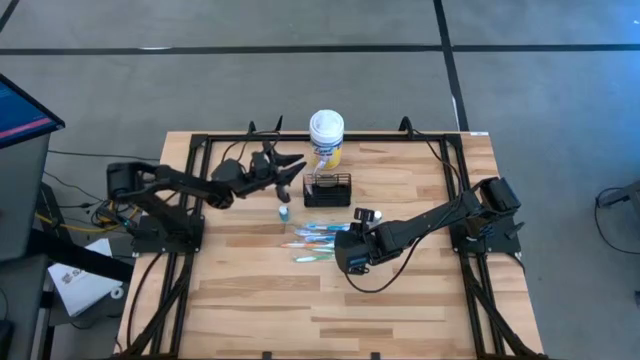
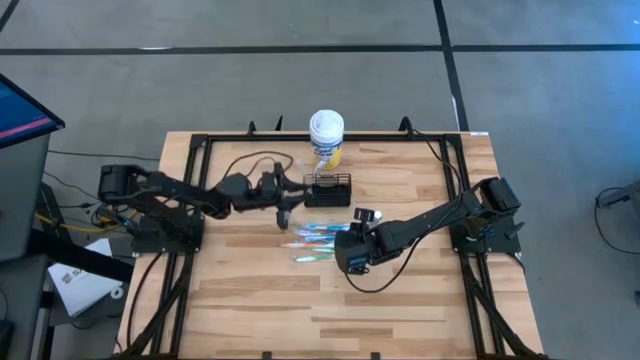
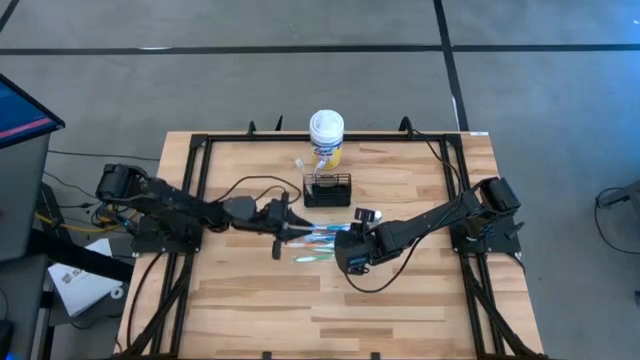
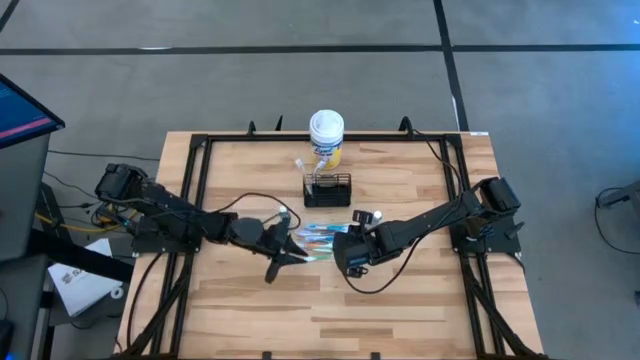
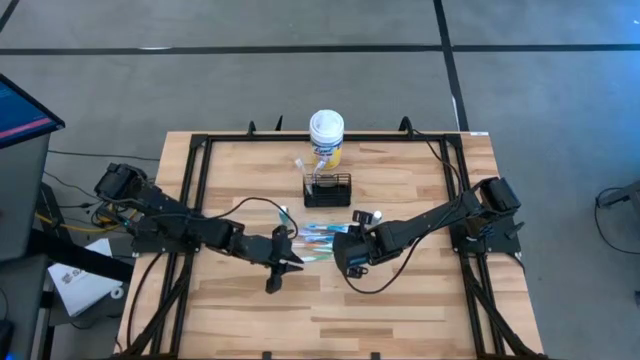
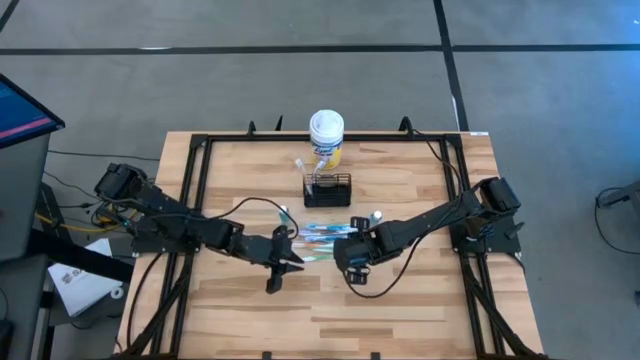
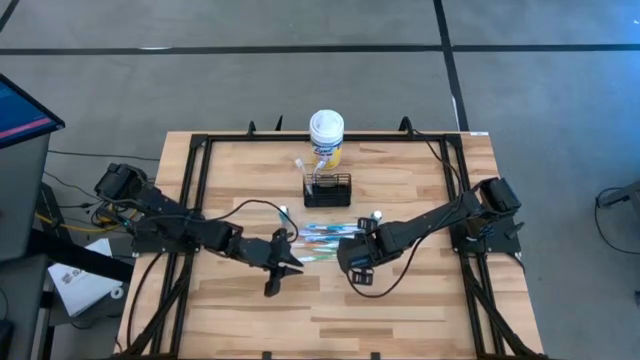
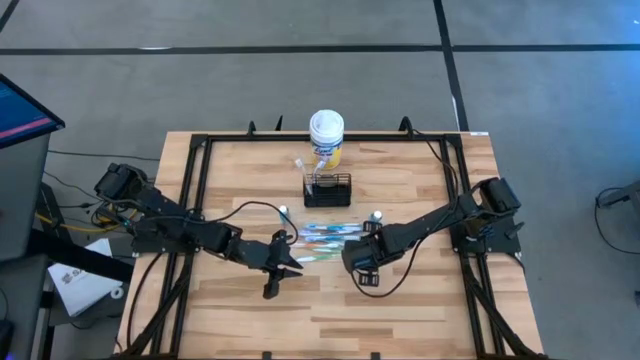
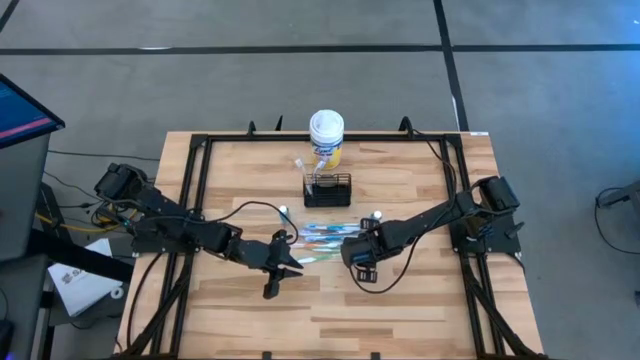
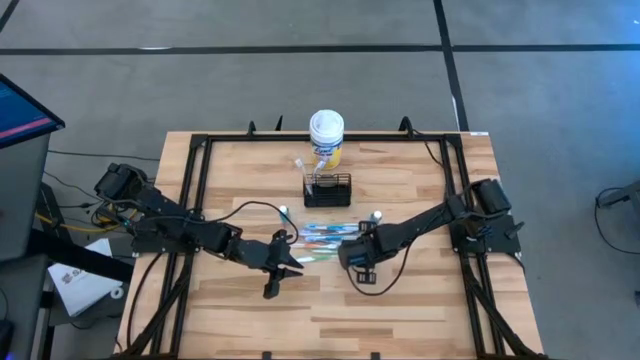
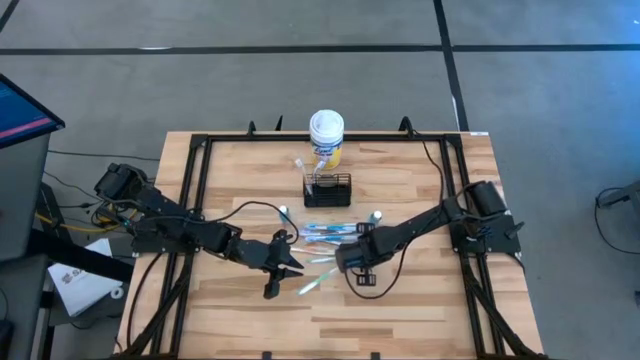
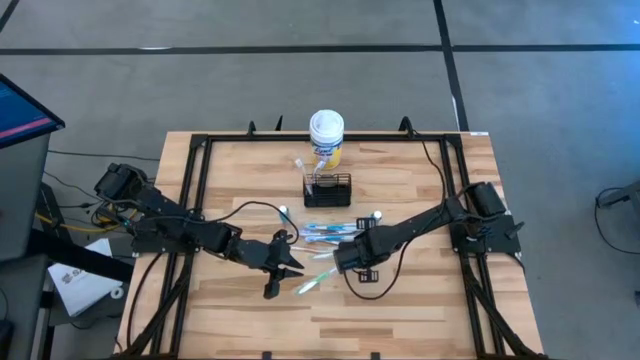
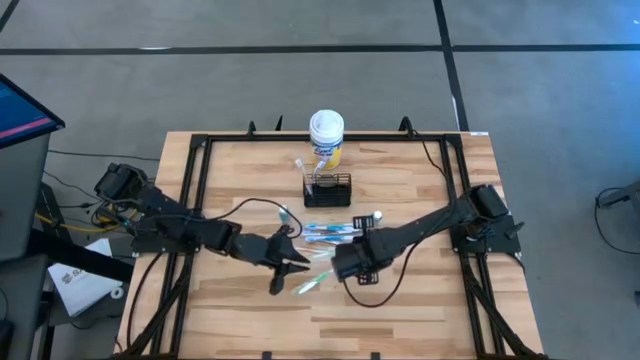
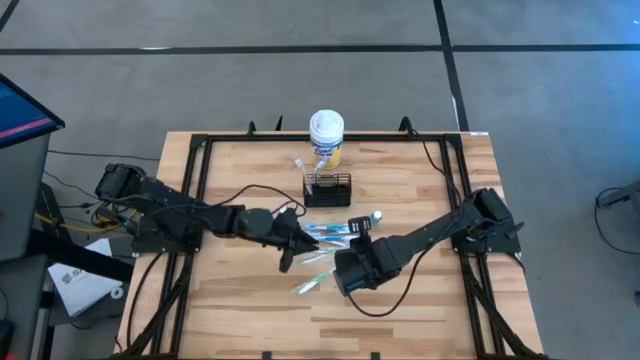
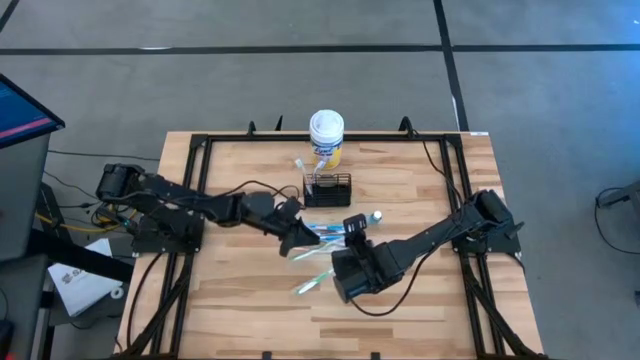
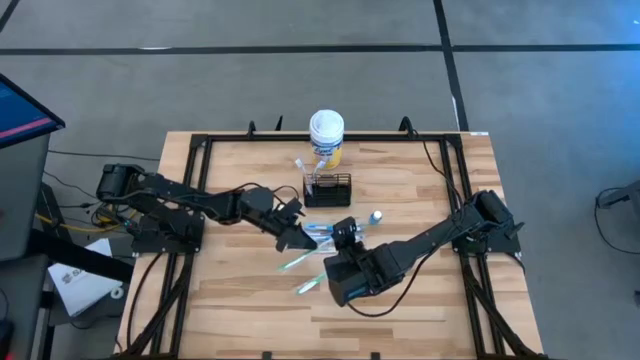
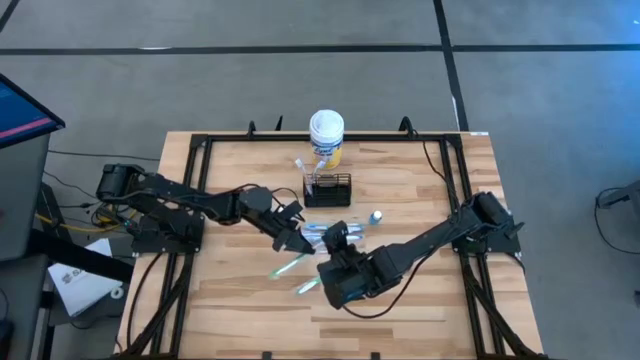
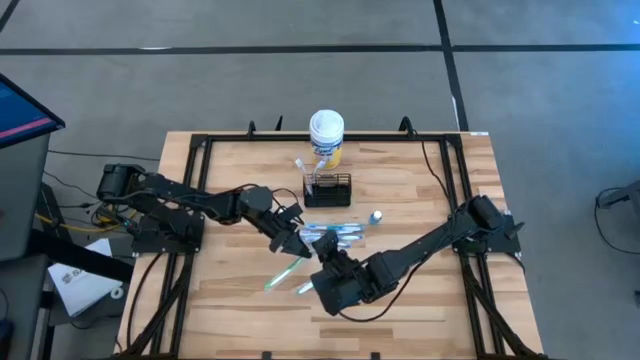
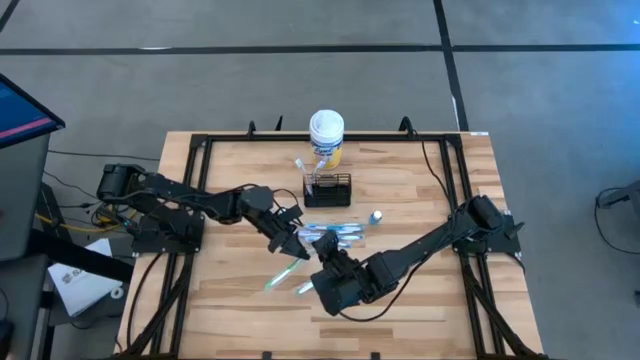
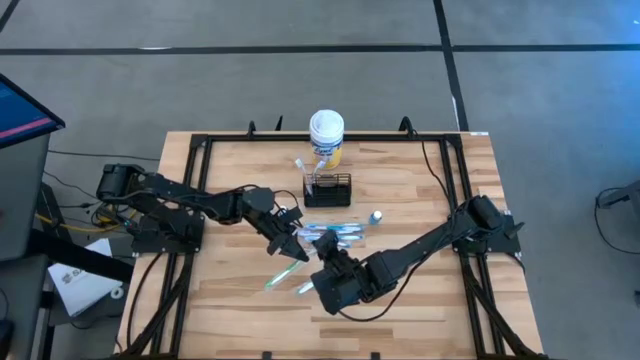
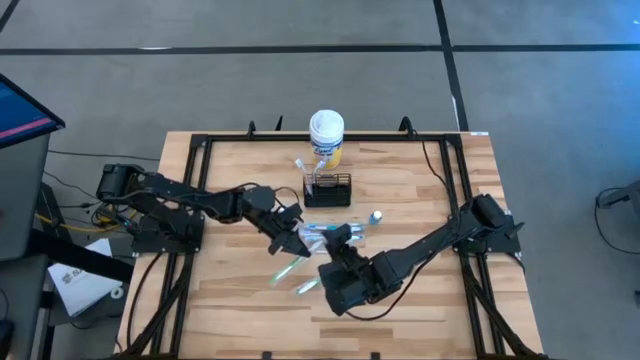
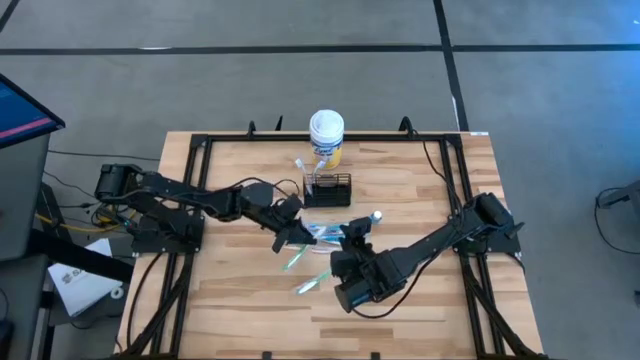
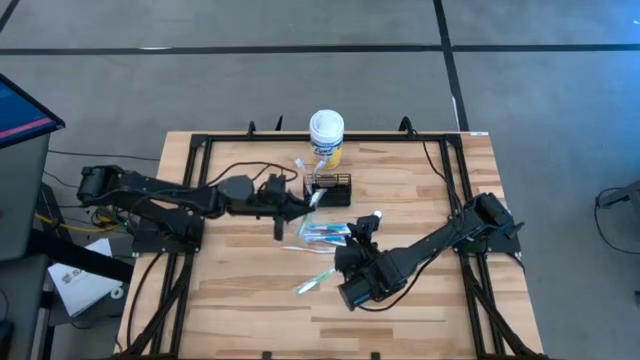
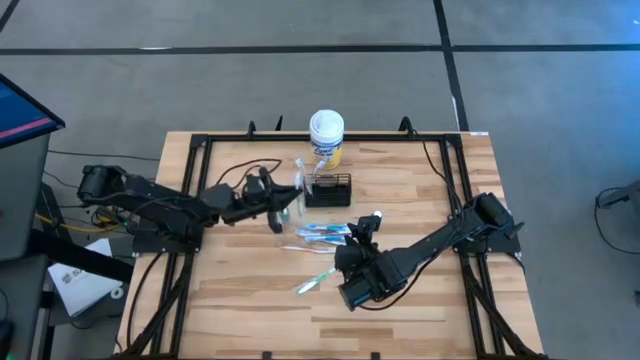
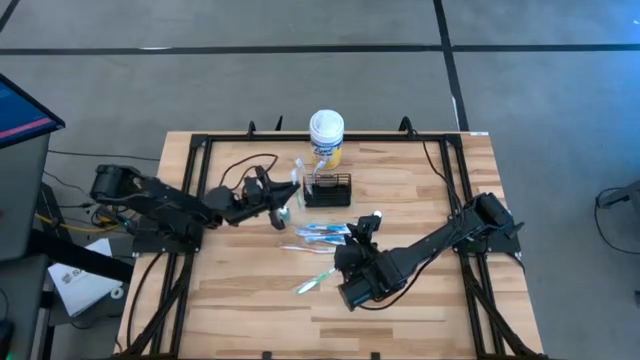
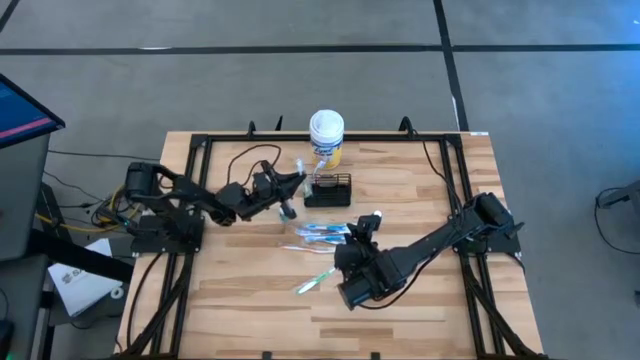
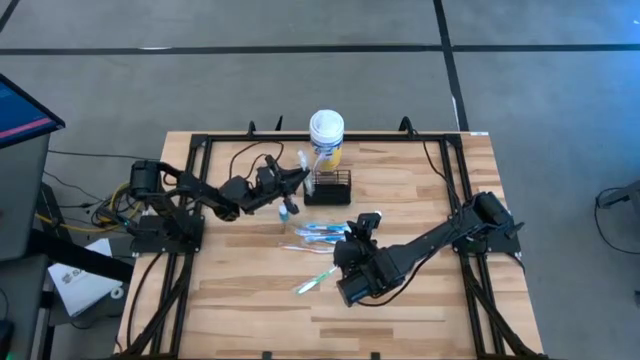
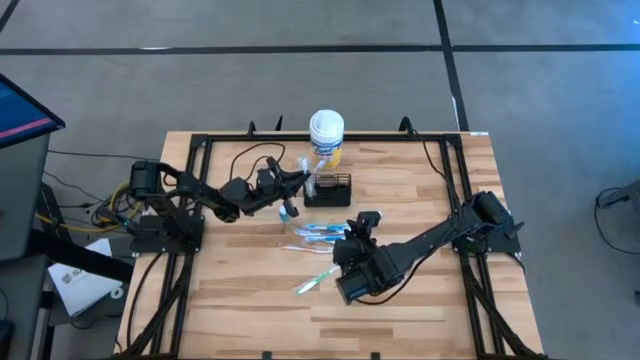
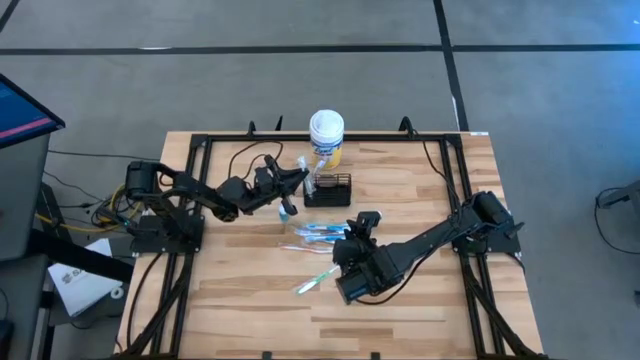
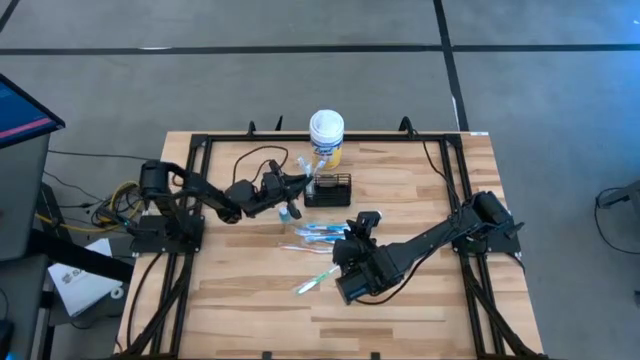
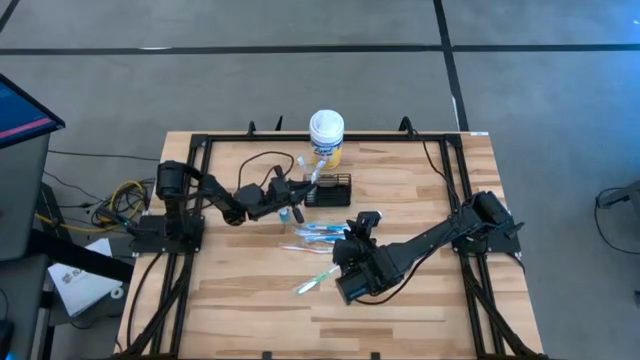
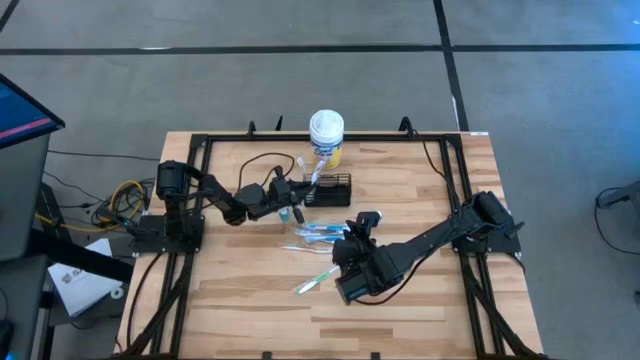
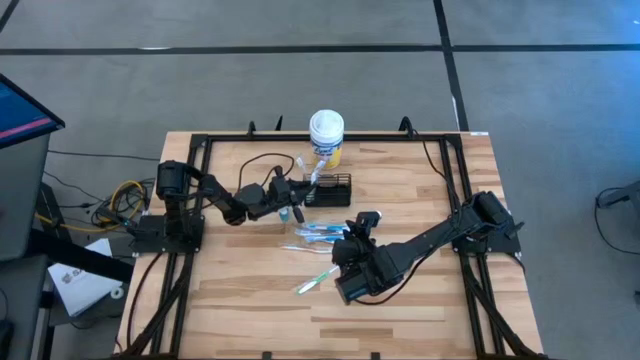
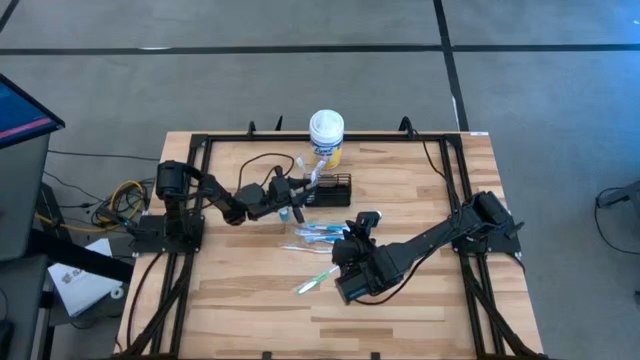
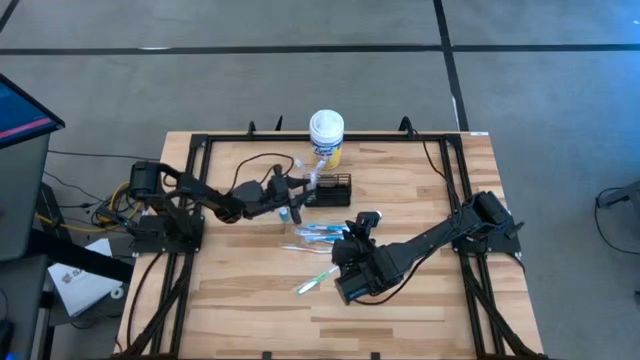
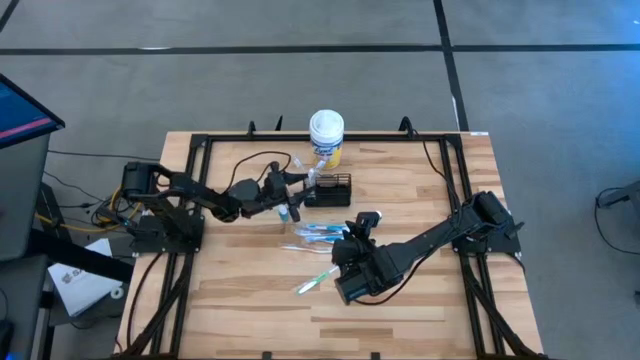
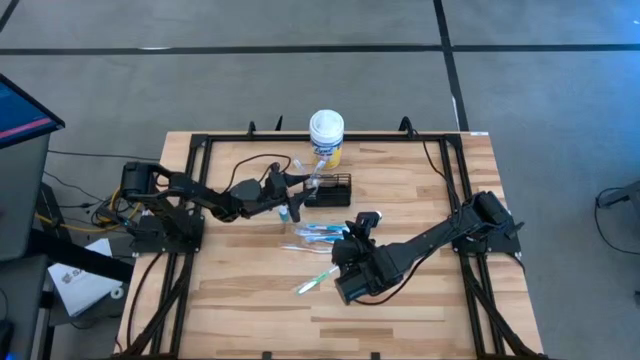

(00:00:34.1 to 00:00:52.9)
Task: Pick & Place toothbrushing station
Put the green toothbrush into the black wire organizer

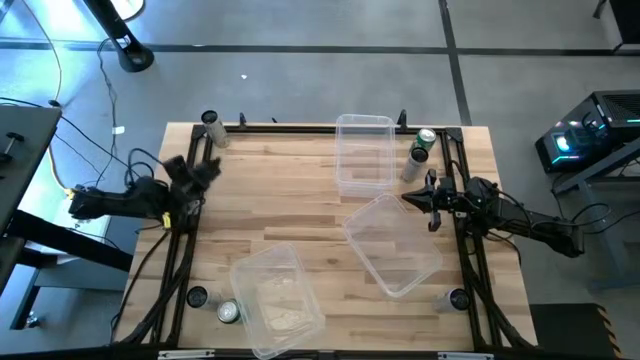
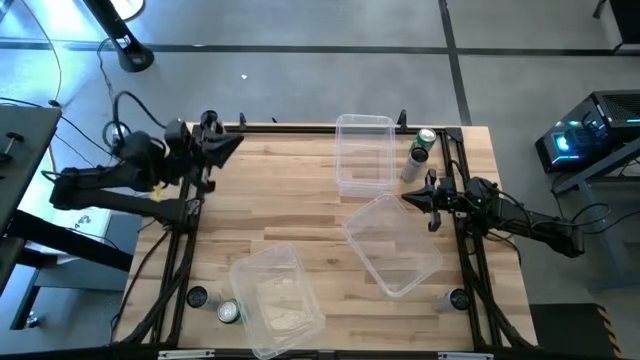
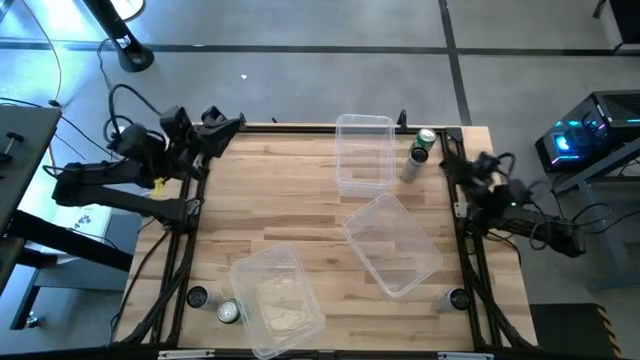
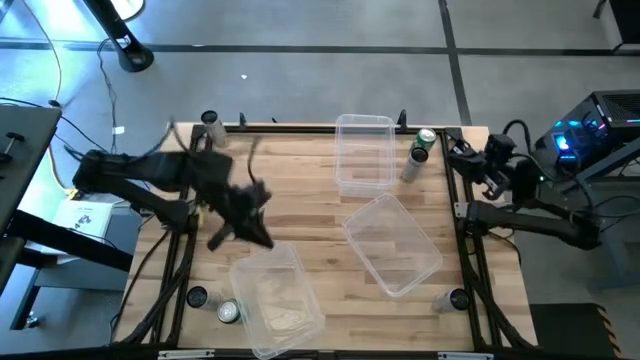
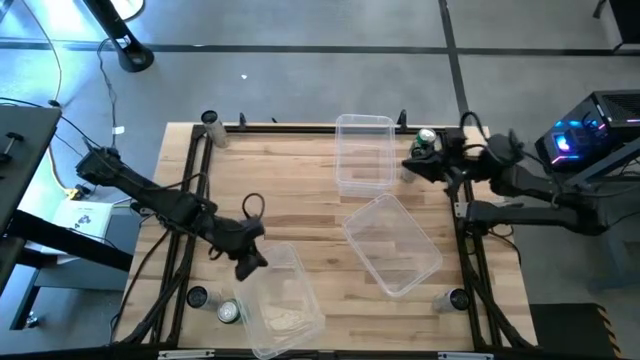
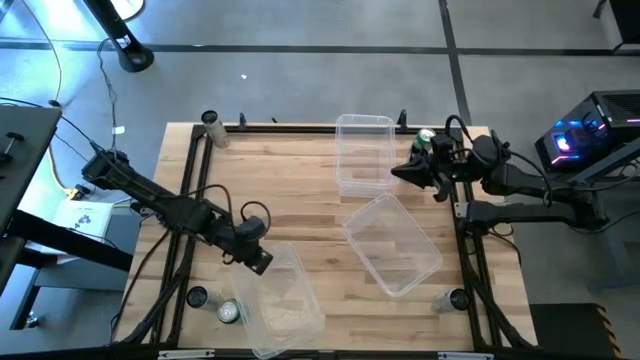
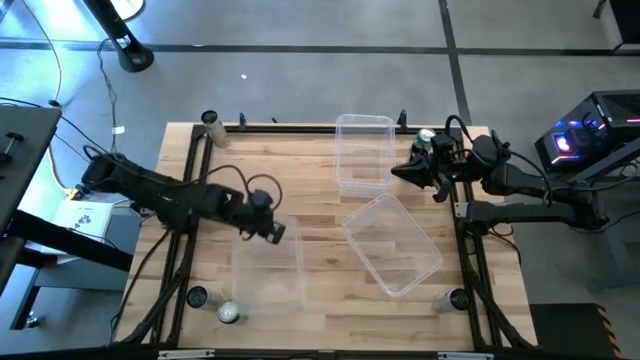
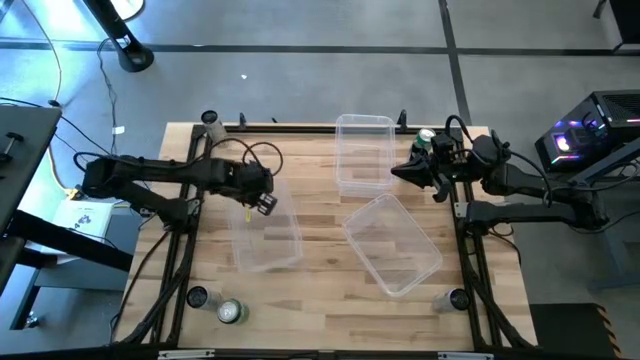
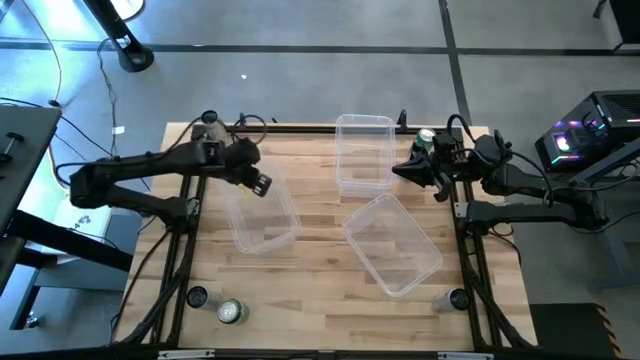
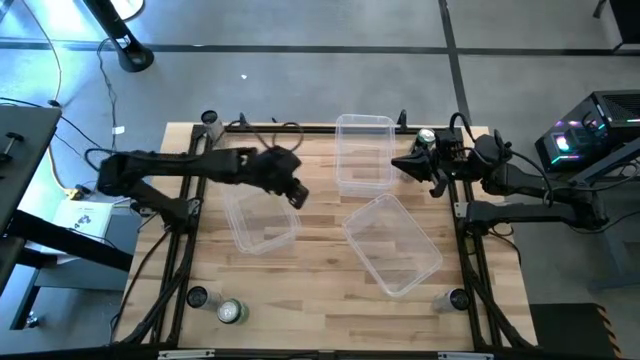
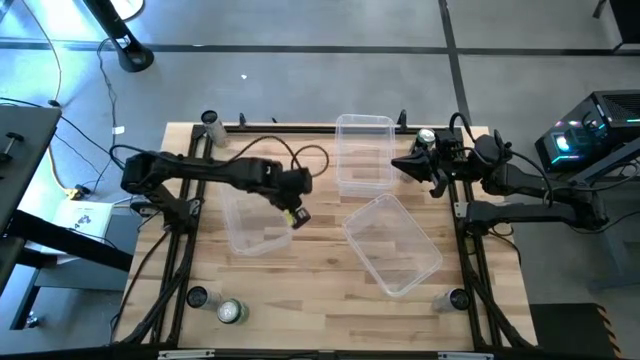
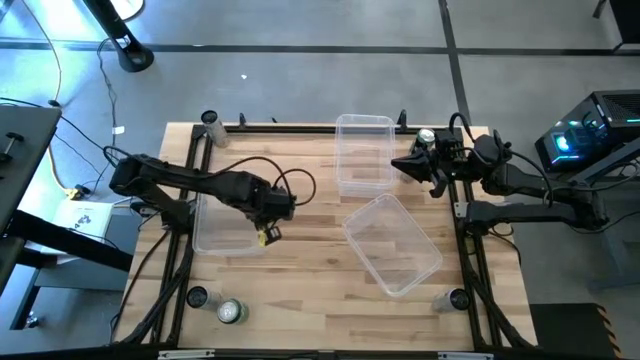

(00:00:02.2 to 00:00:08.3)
Task: Sort soda cans
Move the transparent container from the bottom to the left of the table
